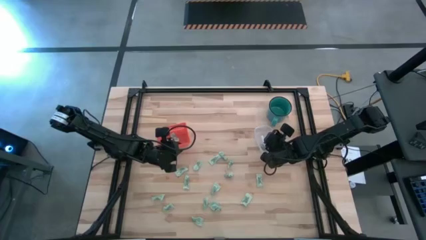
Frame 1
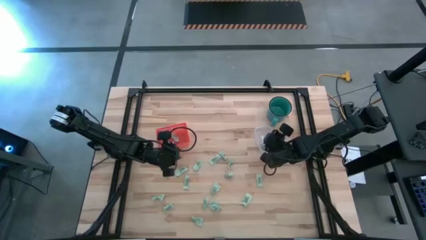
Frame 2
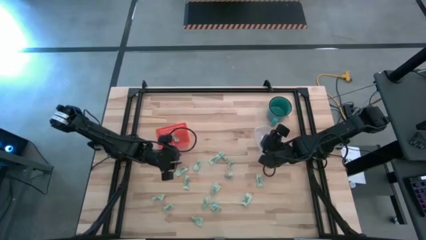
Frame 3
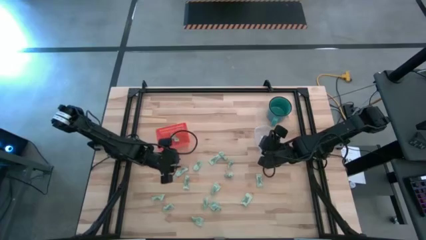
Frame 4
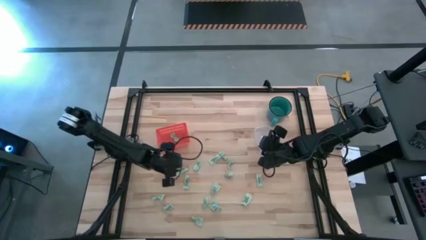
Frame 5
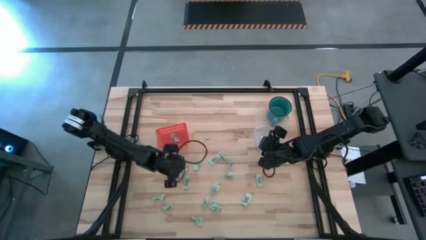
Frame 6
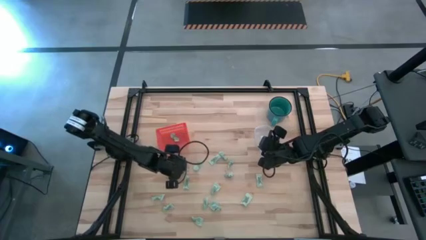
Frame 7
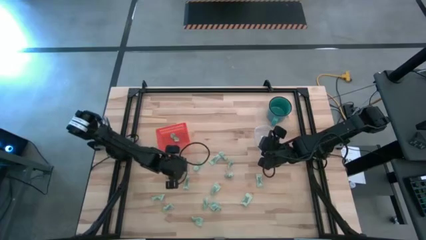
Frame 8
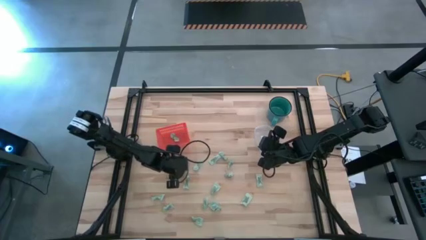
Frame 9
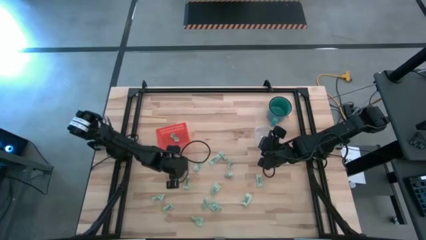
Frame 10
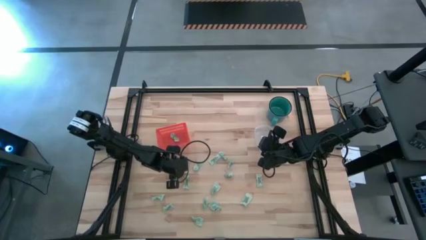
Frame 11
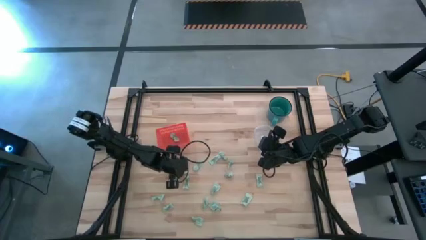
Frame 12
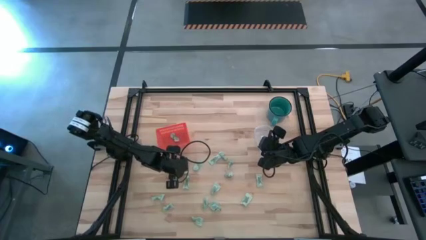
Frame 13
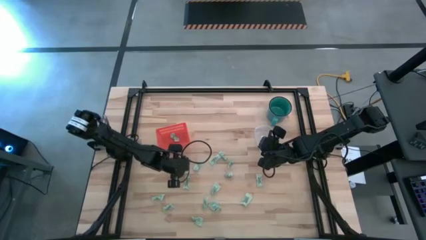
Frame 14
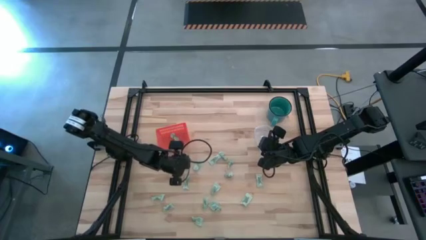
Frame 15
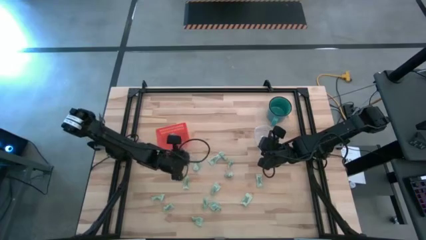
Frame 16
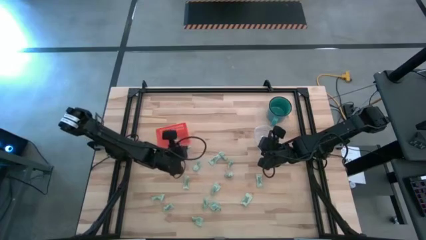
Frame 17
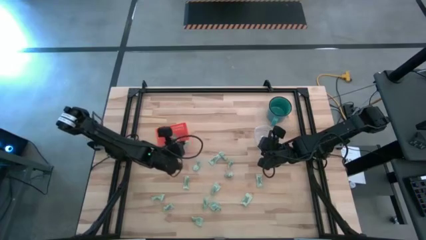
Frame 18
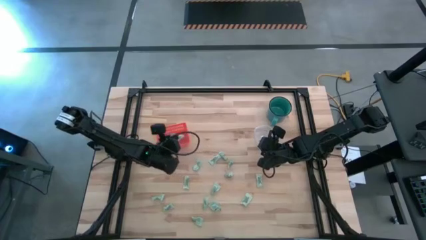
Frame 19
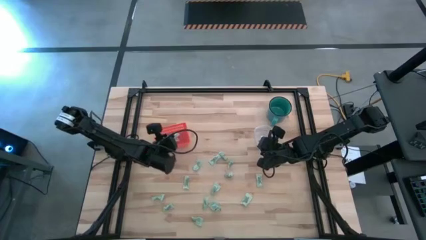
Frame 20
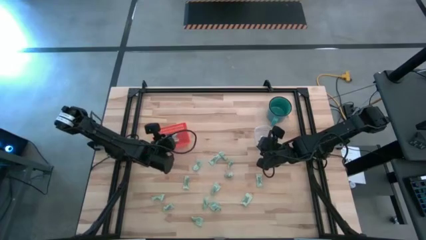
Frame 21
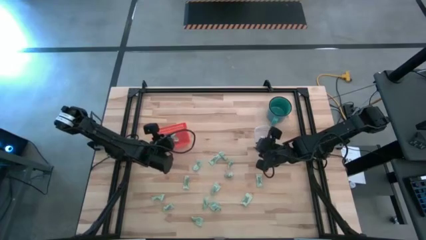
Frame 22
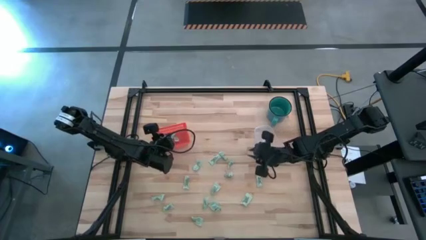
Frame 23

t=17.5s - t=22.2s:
Task: Pick and place items into bin
Put the stevia packet into the orange bin

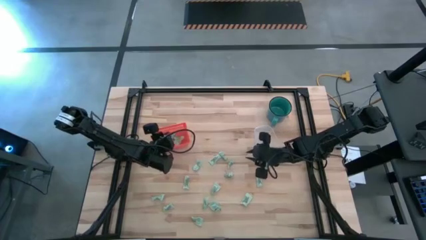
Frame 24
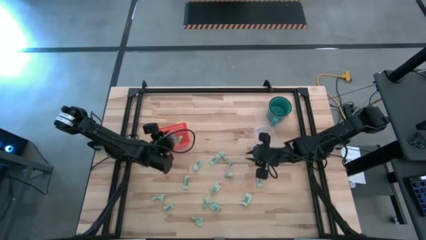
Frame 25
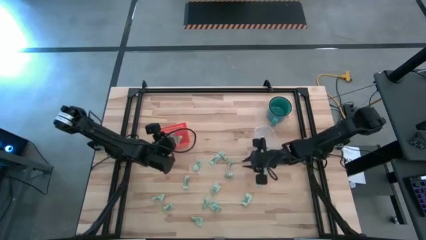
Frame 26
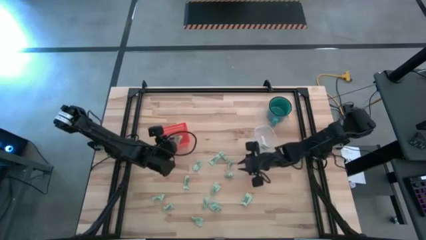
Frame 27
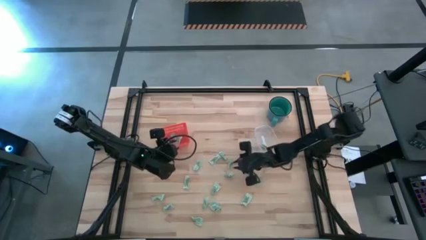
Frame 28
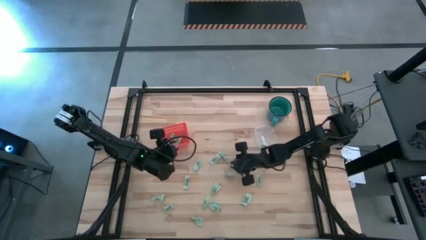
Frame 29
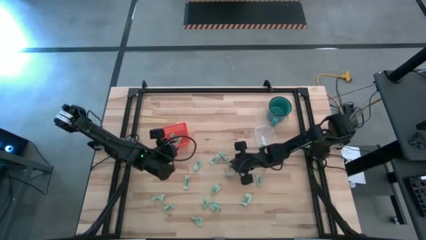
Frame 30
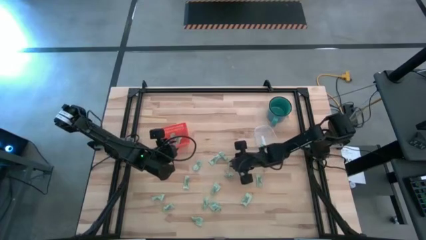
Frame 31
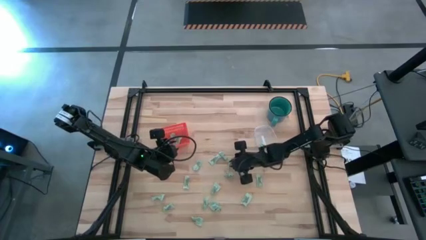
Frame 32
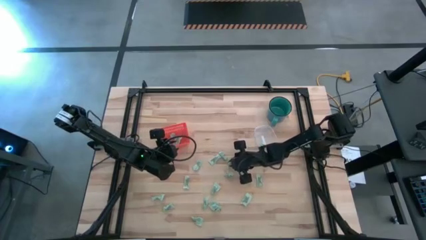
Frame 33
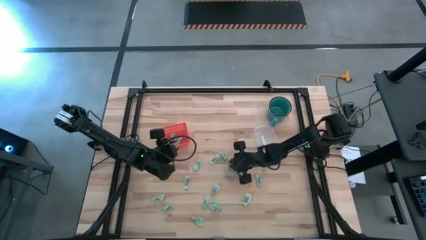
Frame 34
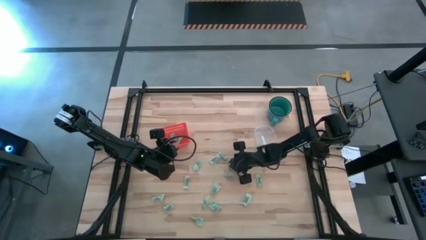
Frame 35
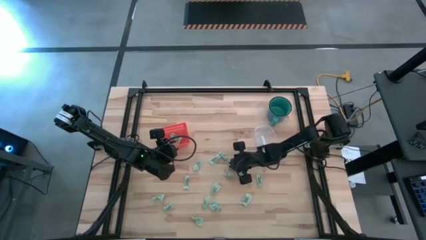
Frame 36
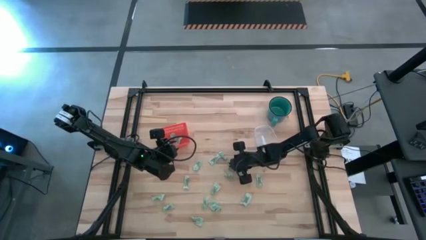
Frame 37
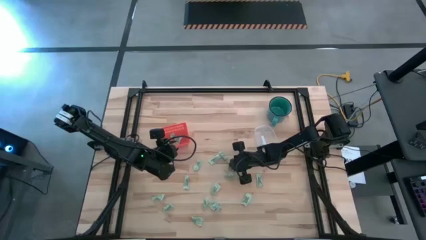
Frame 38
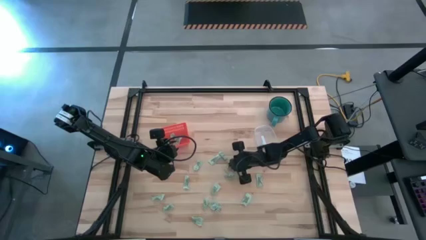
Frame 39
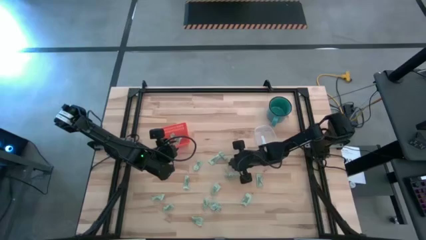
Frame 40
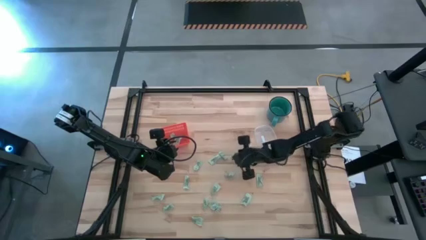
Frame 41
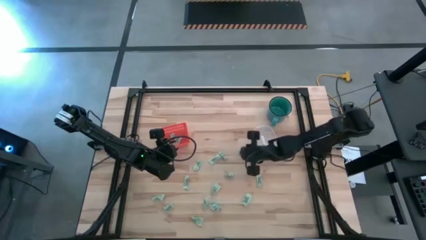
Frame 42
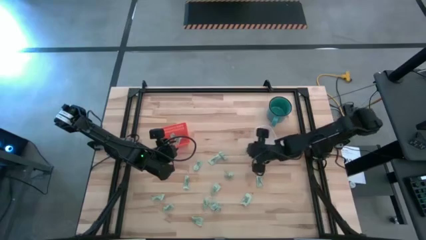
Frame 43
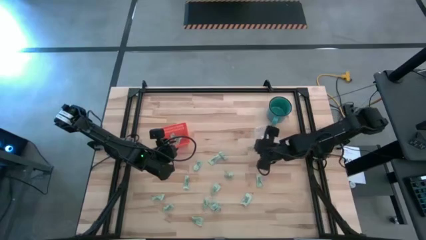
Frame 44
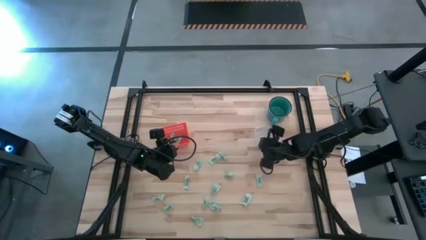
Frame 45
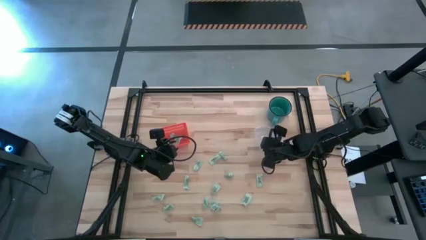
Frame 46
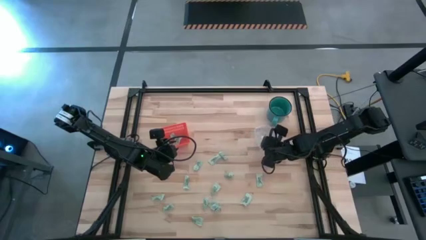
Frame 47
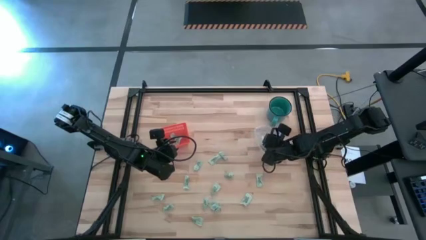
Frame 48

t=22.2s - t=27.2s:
Put the stevia packet into the transparent container

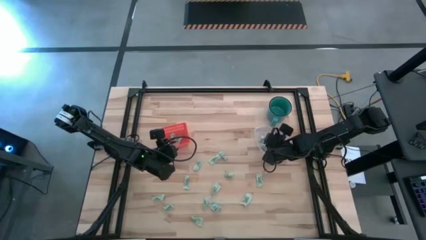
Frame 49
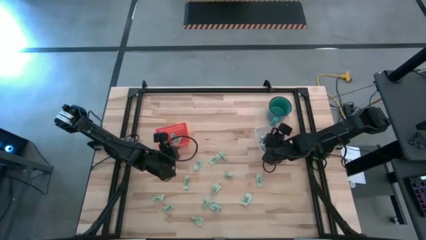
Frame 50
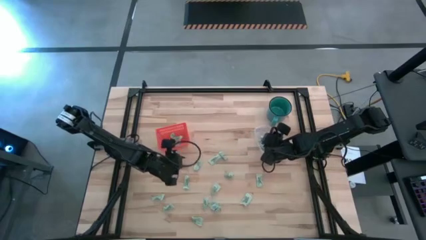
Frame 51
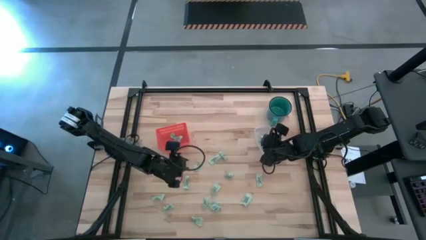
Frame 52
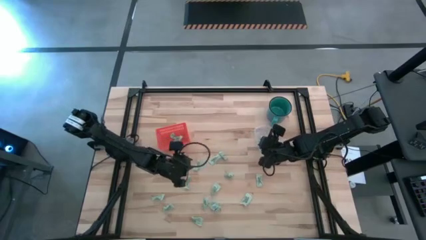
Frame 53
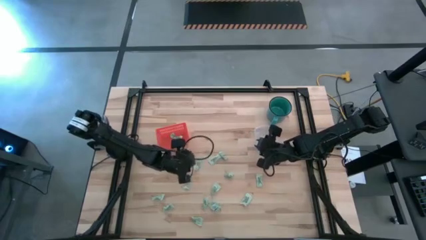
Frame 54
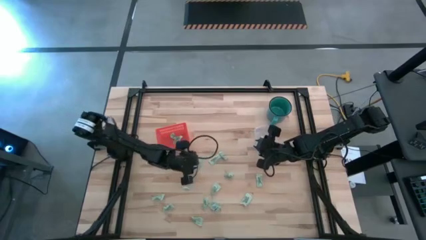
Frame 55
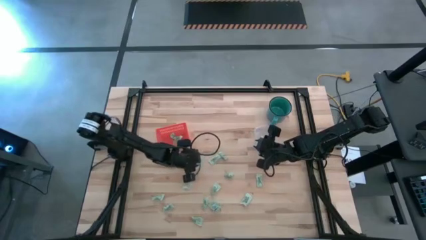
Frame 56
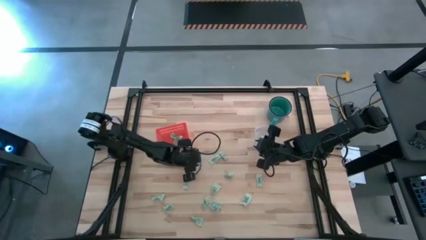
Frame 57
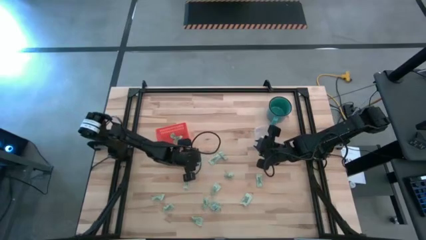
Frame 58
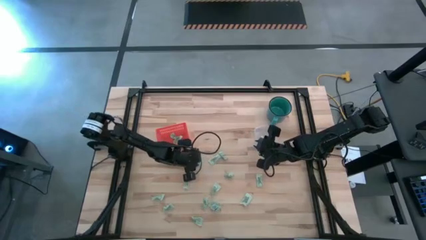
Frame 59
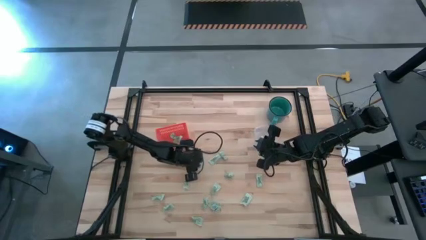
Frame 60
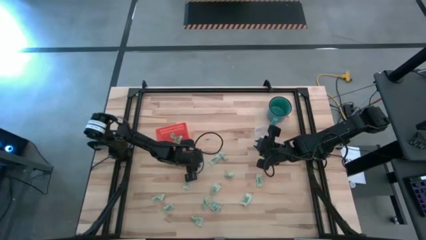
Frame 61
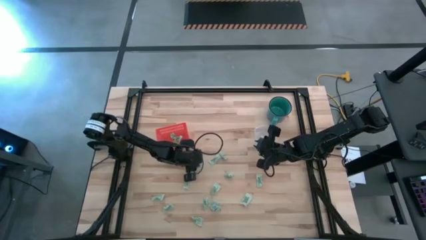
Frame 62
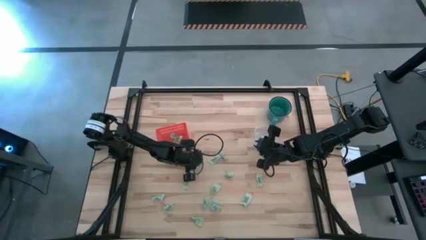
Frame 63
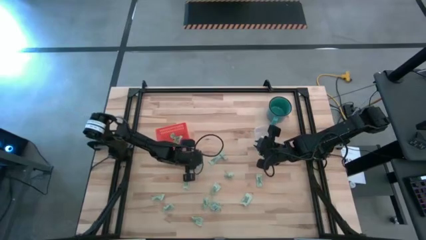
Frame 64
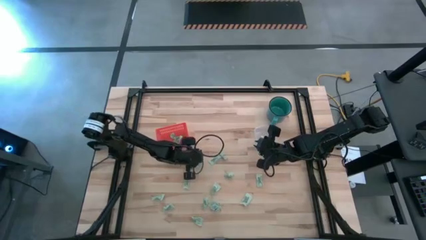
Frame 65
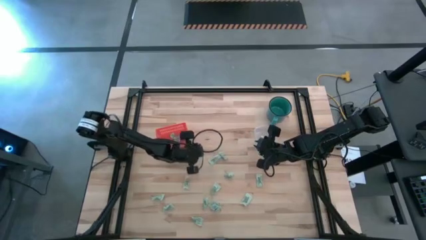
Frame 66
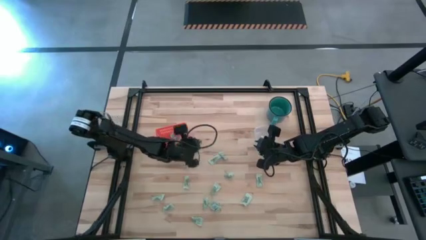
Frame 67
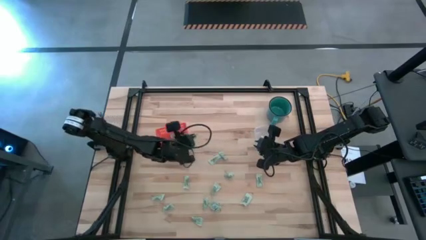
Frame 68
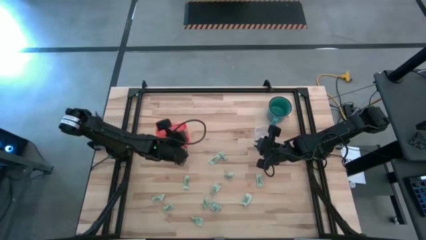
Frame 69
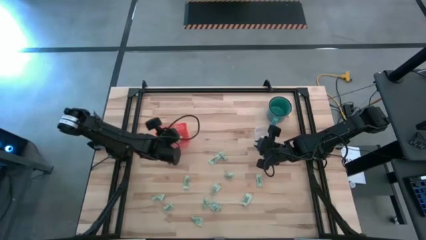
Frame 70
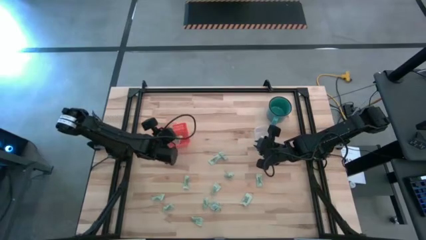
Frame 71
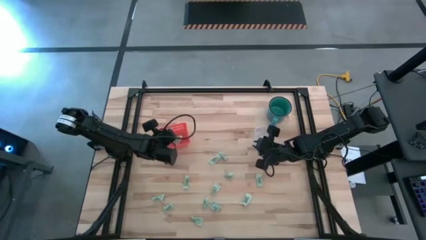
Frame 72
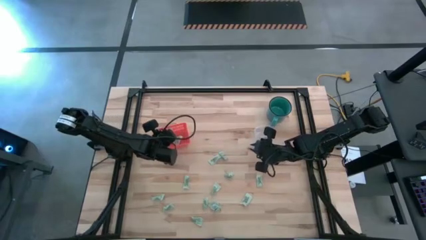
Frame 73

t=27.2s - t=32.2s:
Put the stevia packet into the orange bin
